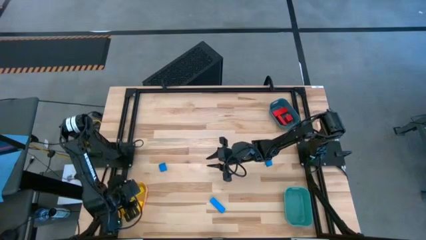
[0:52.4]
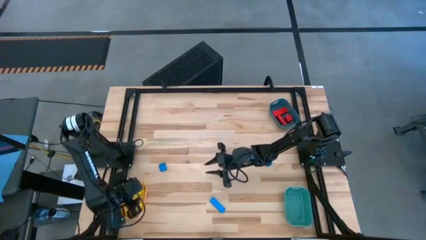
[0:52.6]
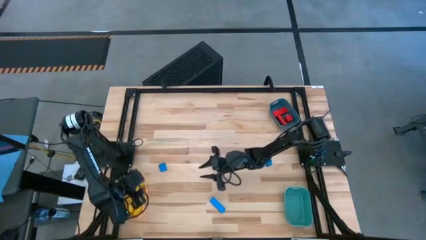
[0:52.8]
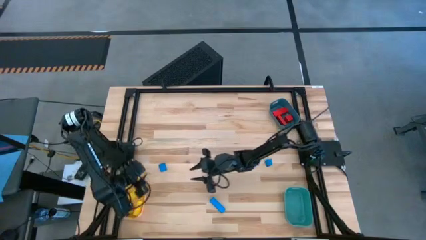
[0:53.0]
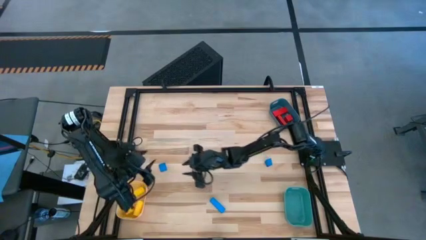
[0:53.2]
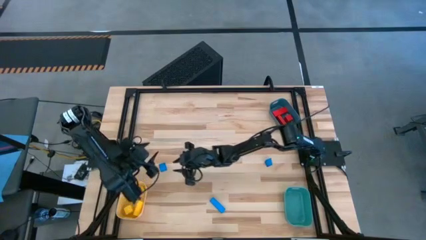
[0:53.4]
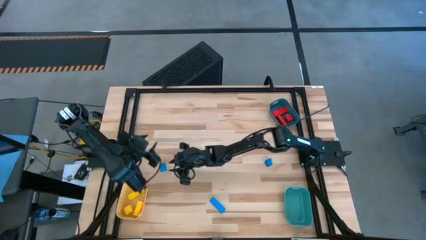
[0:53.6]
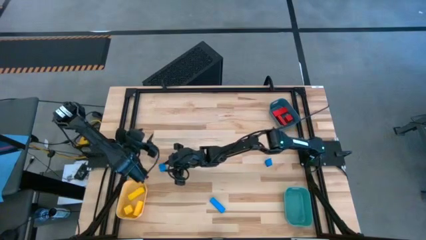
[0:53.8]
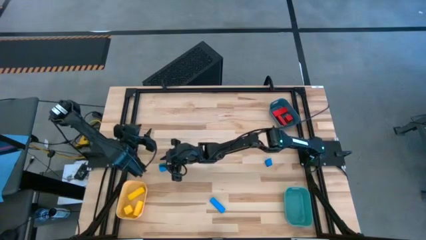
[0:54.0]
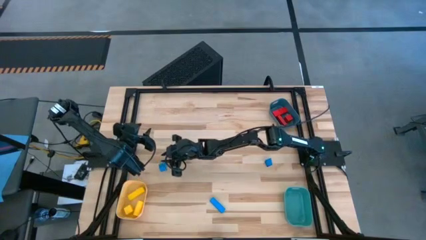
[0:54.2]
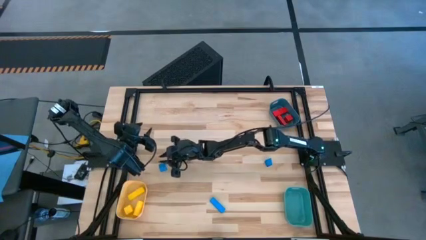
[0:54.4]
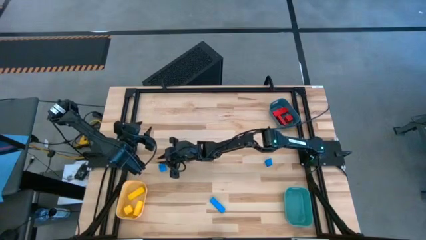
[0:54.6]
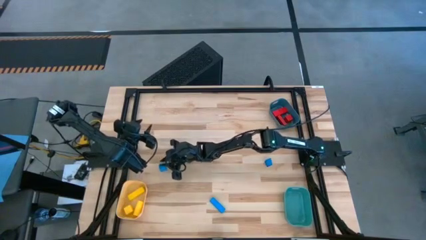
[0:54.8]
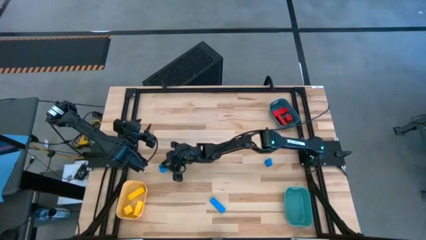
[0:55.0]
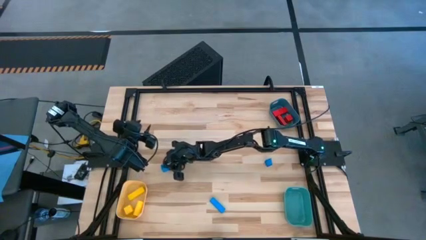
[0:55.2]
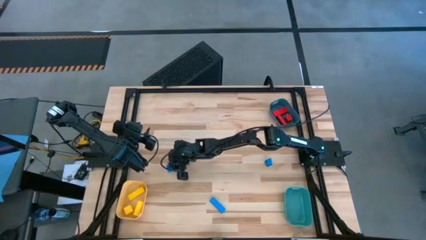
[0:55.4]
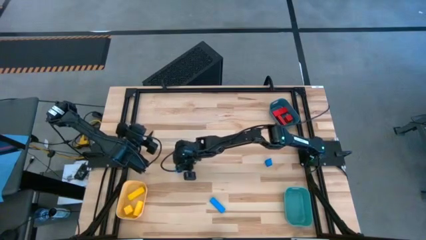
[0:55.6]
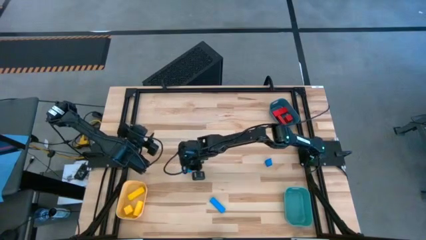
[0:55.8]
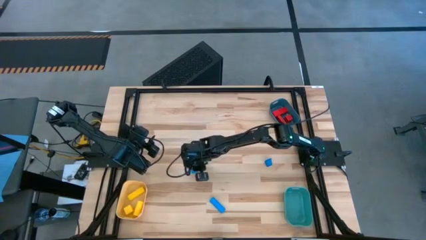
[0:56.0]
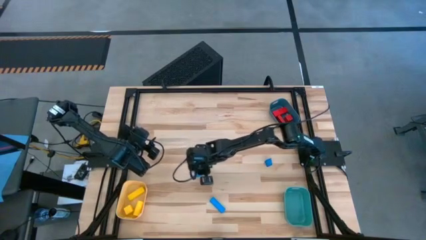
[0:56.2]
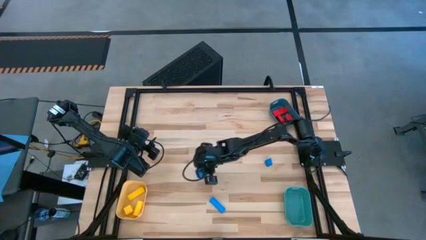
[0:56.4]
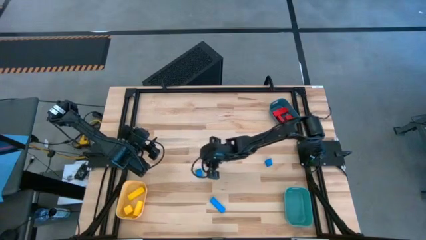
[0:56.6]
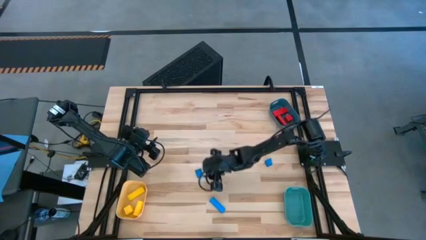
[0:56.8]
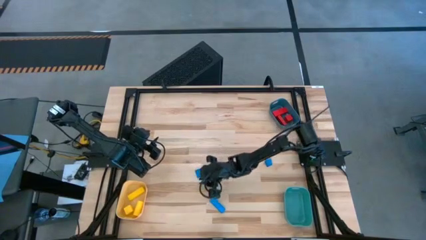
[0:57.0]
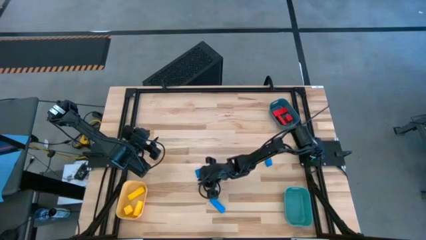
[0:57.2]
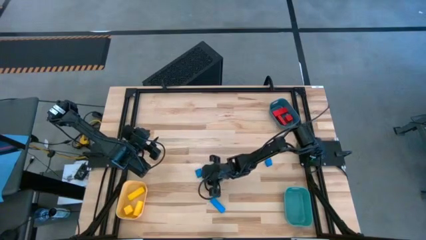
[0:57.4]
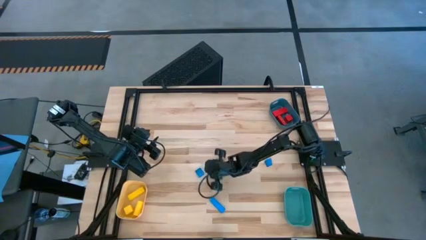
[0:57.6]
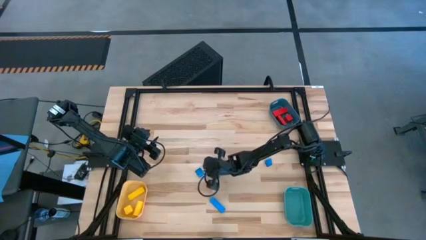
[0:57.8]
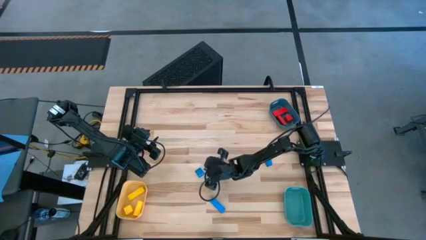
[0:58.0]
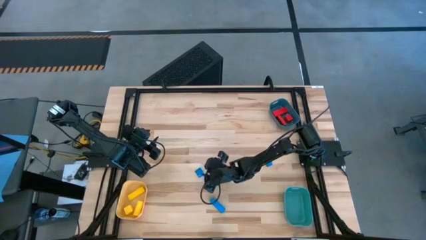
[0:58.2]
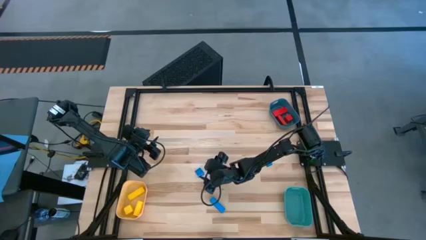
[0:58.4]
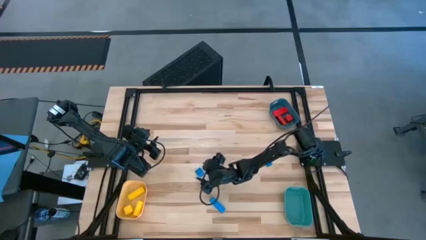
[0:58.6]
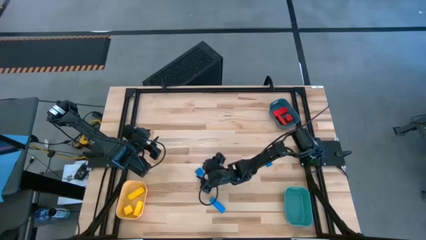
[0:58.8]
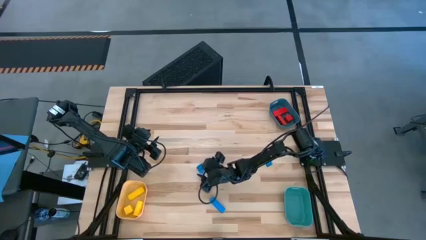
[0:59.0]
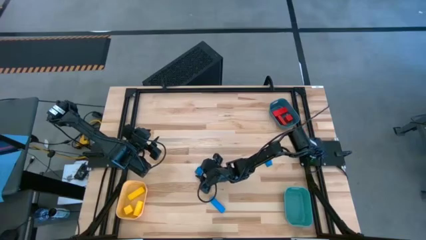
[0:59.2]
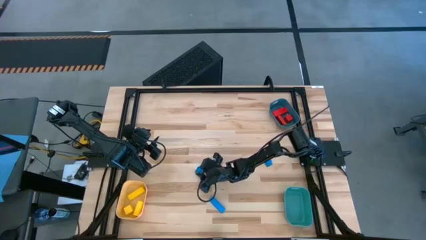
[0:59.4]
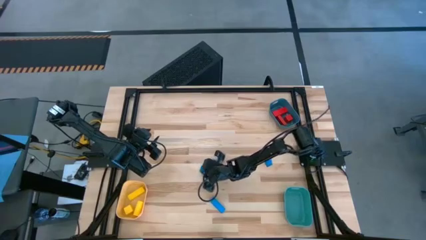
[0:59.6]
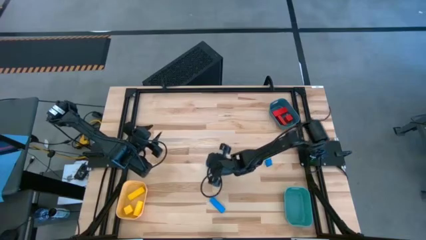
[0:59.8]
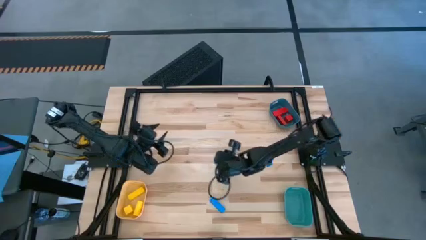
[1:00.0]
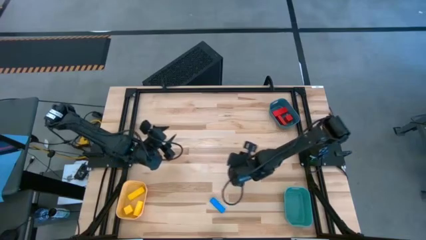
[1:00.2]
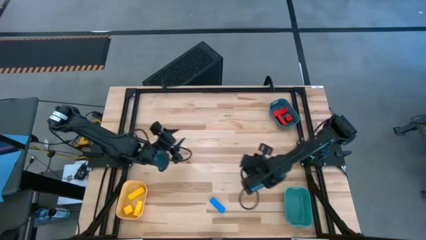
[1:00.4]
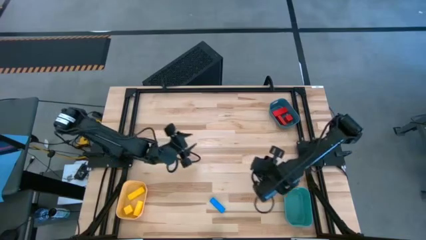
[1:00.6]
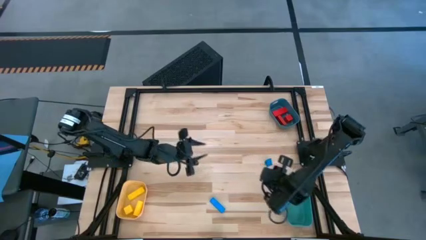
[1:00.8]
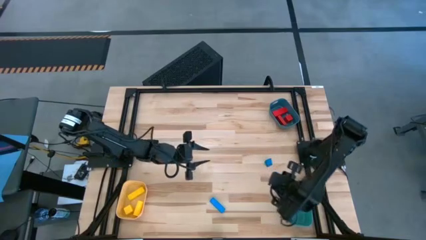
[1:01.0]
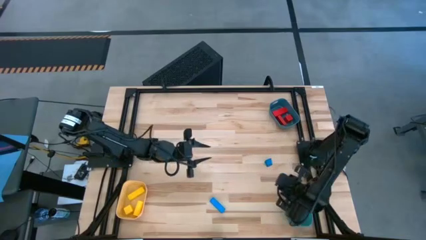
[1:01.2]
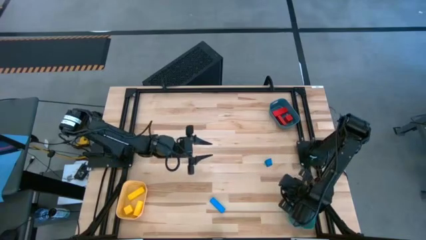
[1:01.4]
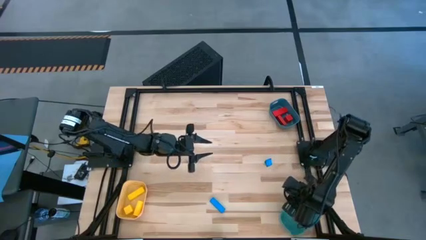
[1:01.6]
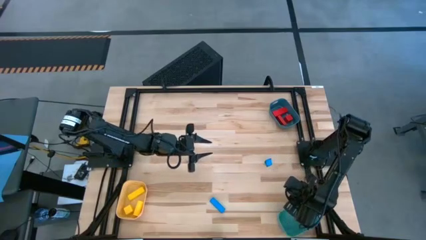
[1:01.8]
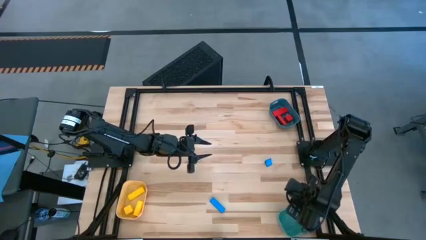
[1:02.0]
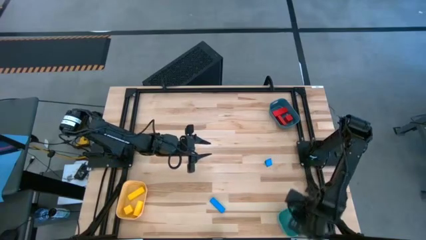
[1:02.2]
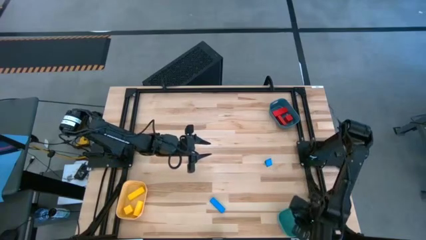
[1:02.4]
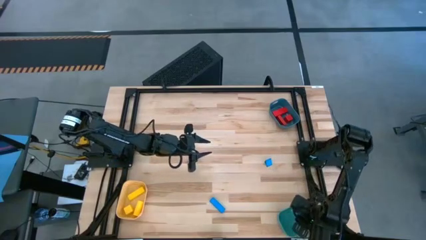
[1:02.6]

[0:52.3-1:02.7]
Task: Sort & place blocks by color
Put the top left blue block into the green bin

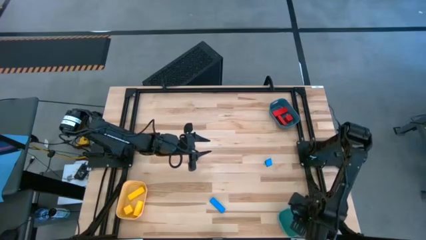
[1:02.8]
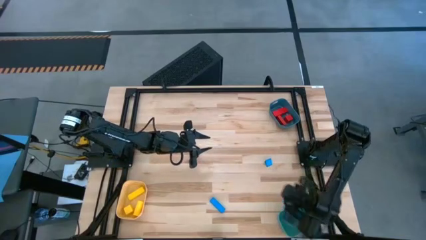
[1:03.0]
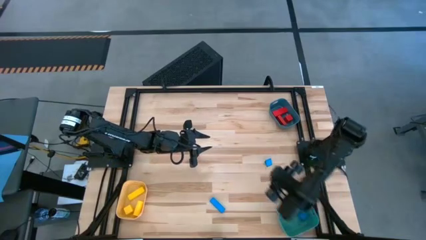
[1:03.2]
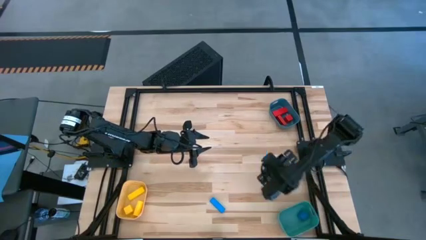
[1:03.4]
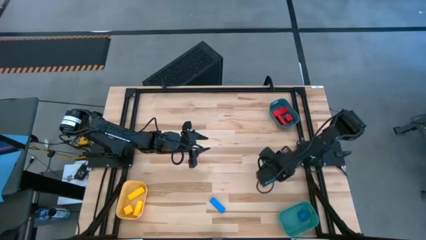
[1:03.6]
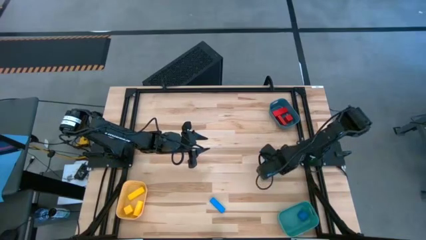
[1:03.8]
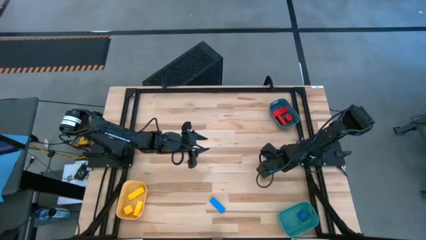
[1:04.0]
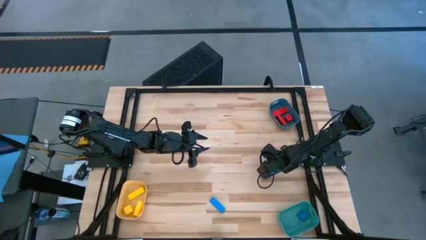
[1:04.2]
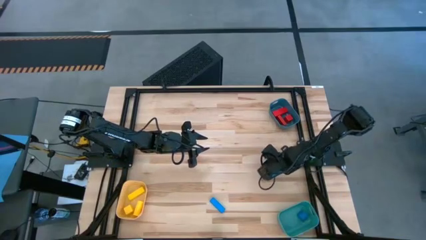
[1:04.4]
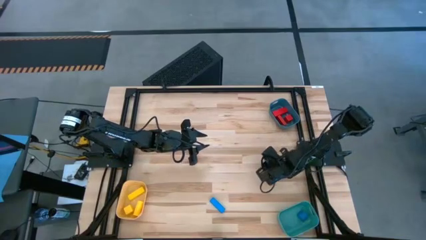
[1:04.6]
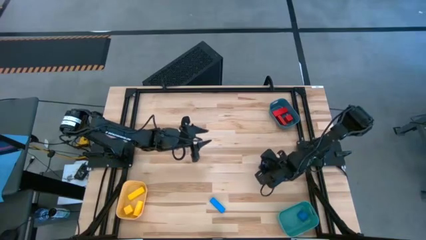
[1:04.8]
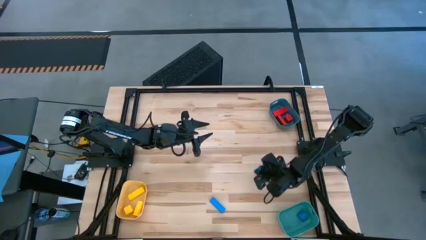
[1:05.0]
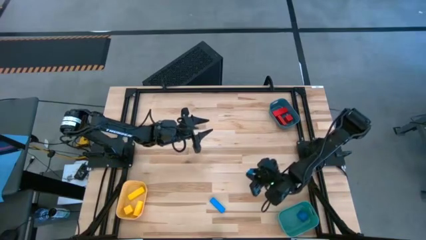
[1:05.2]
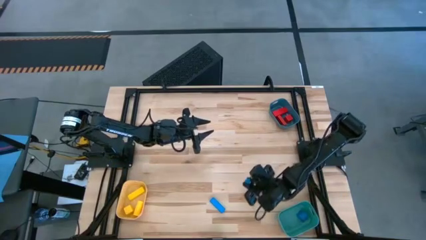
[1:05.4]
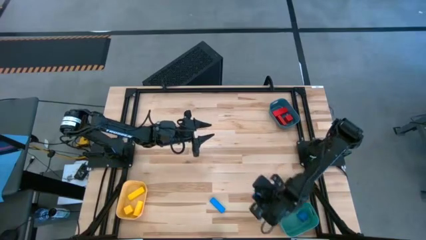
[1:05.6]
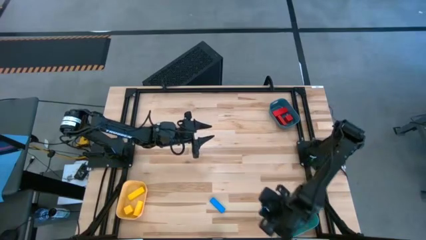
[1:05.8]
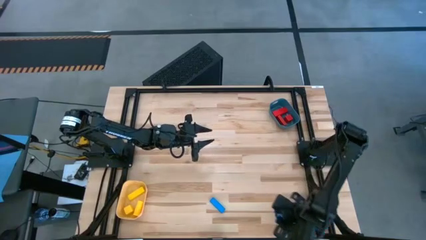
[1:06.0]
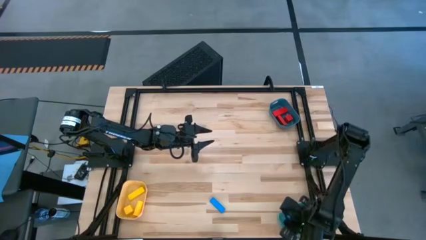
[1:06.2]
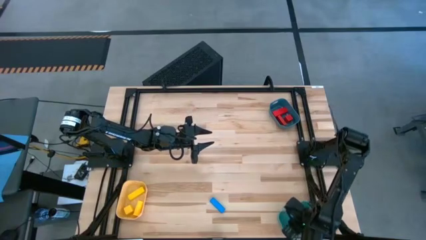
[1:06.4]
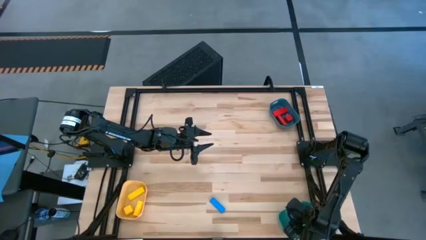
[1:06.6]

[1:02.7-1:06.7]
Put the right blue block into the green bin
